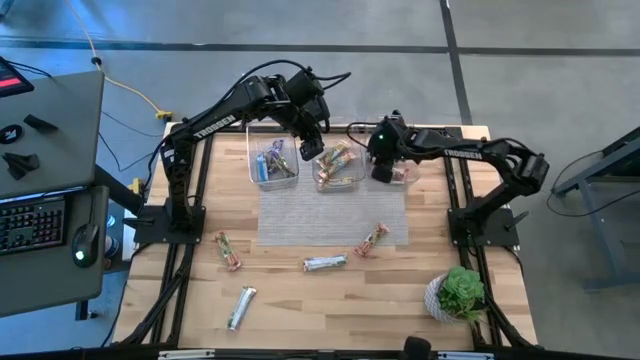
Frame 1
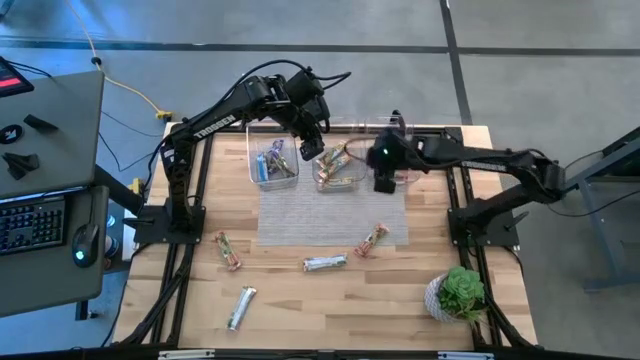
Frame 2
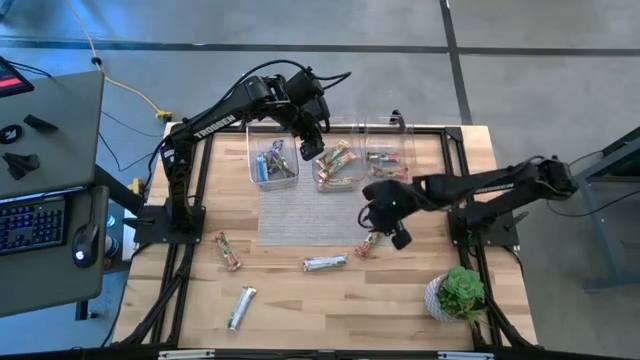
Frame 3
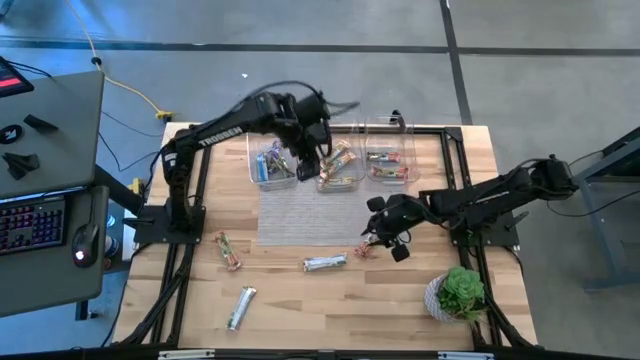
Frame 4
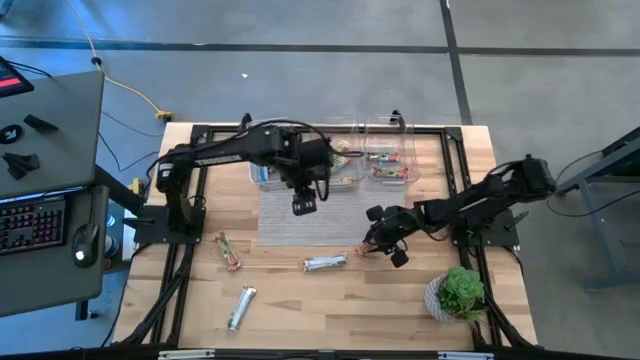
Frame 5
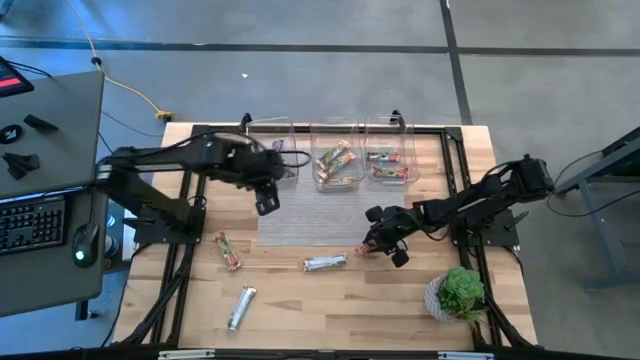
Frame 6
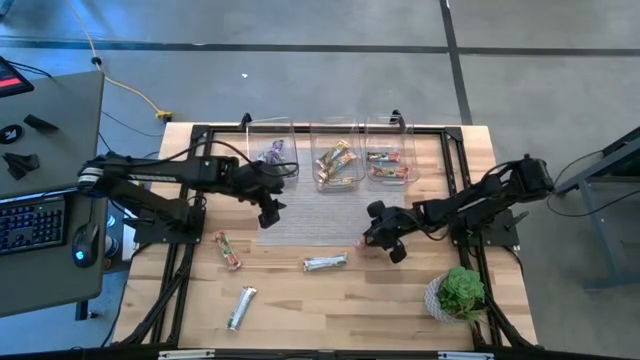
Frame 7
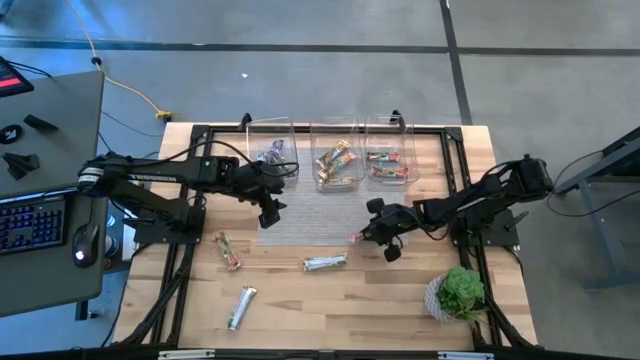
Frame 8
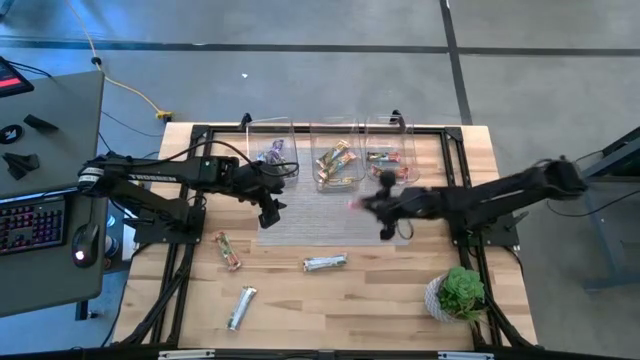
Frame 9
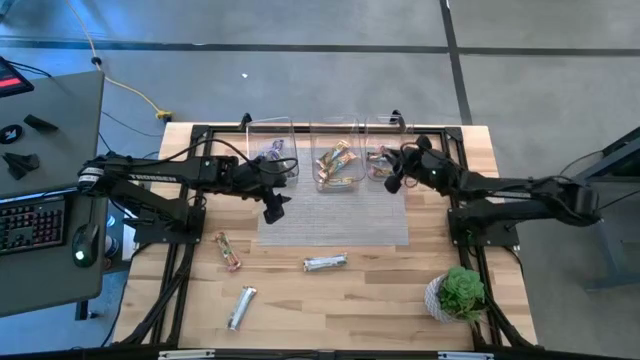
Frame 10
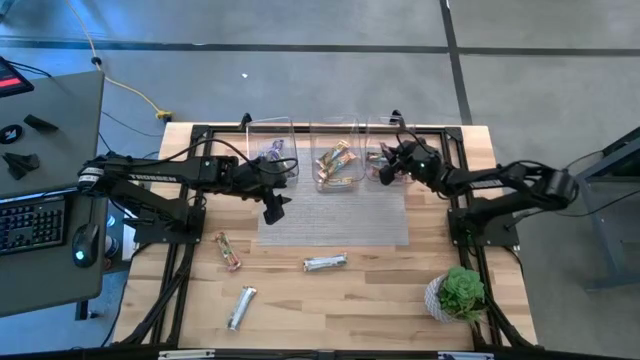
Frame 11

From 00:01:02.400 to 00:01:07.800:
Task: Pick and place Granola Bars by type
Put the red granola bar into the right transparent bin

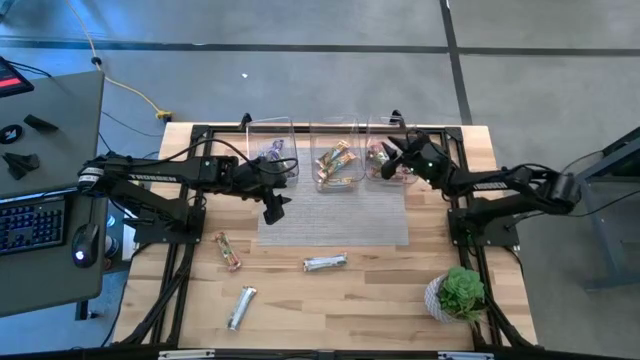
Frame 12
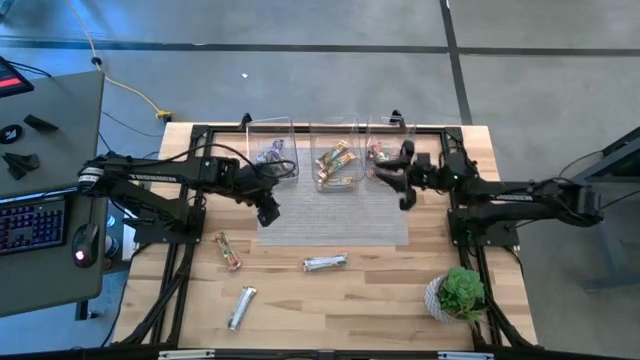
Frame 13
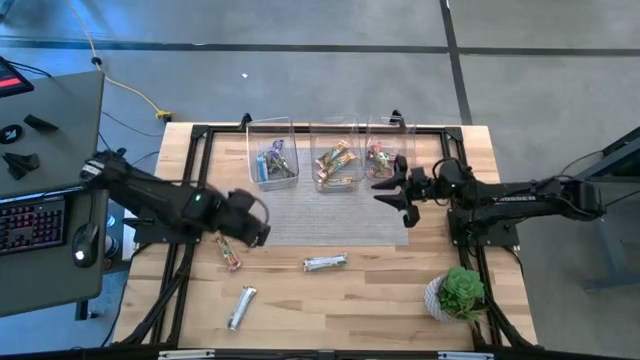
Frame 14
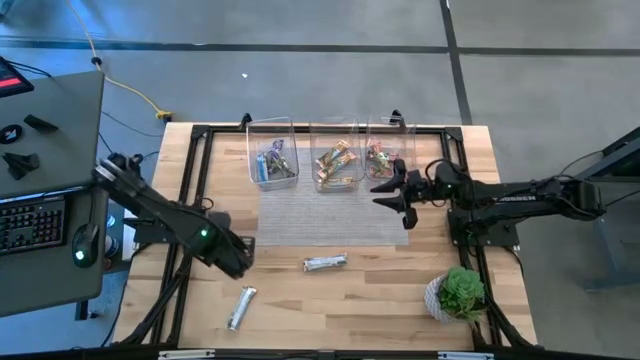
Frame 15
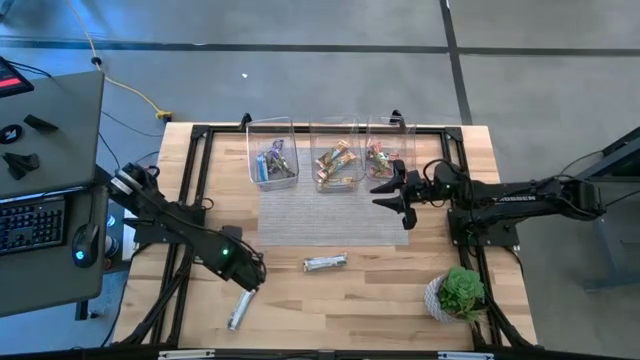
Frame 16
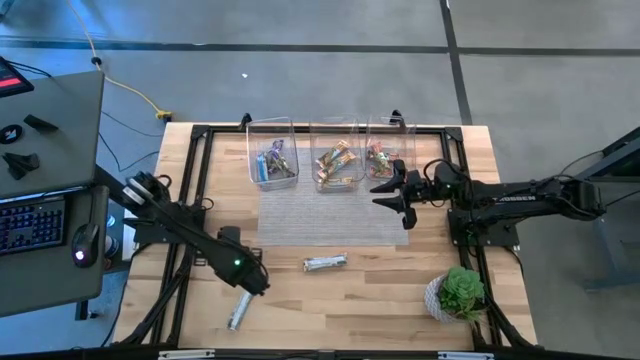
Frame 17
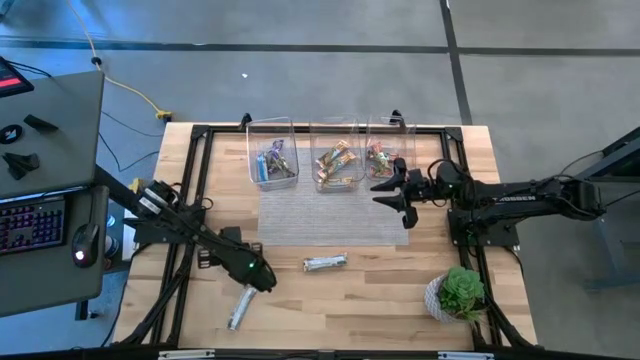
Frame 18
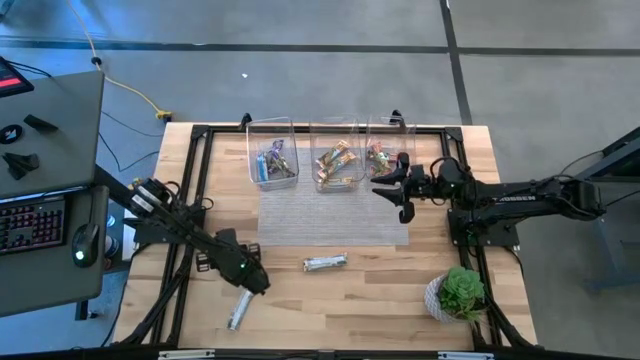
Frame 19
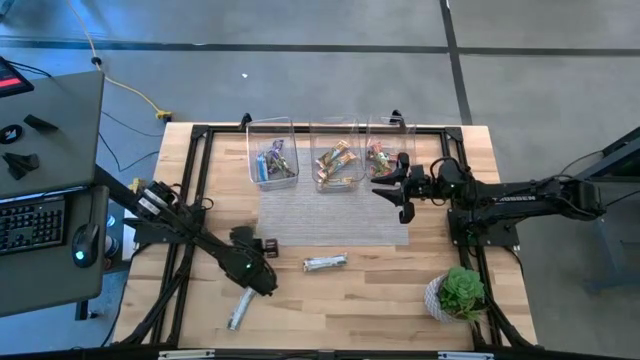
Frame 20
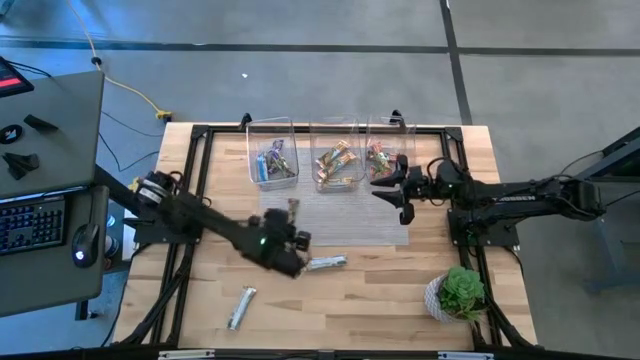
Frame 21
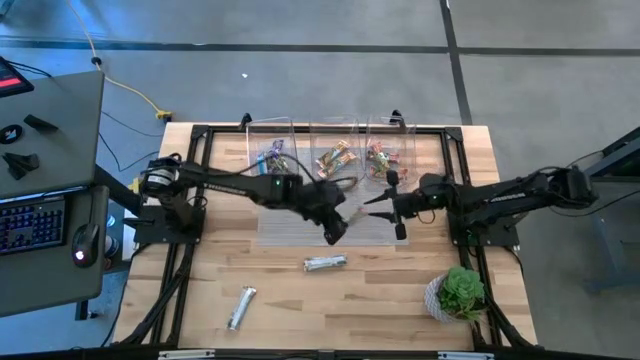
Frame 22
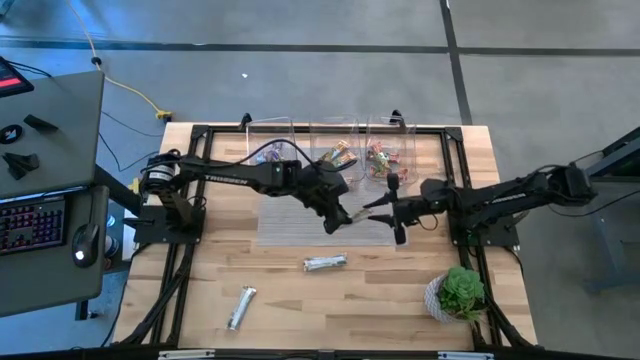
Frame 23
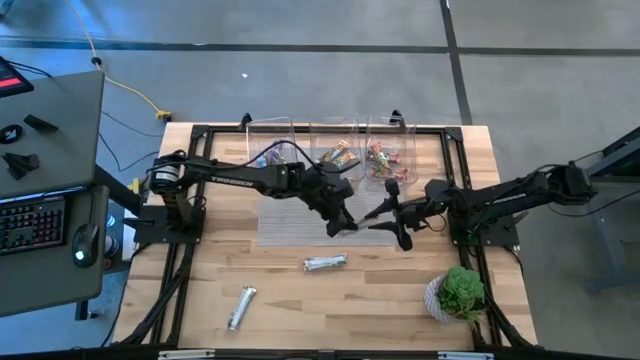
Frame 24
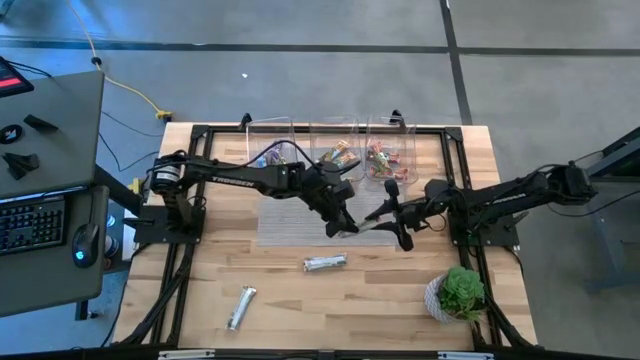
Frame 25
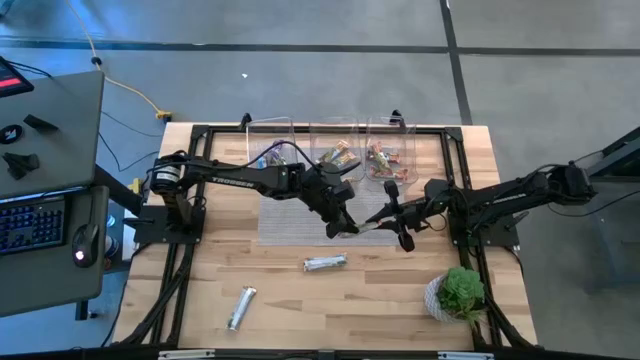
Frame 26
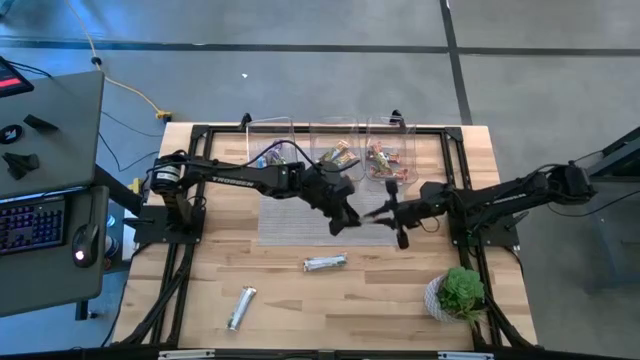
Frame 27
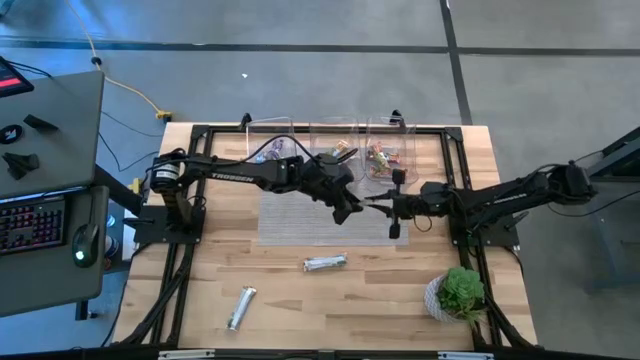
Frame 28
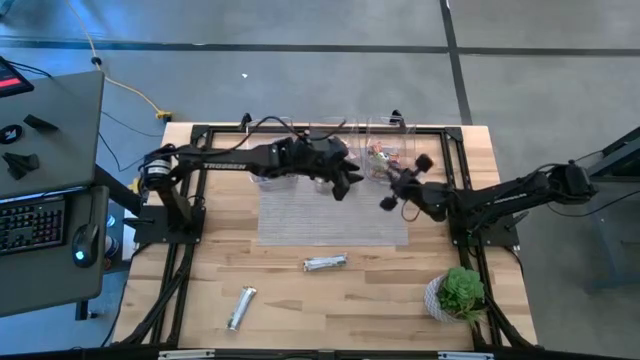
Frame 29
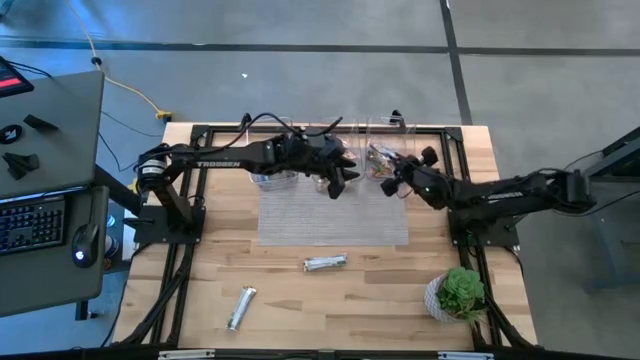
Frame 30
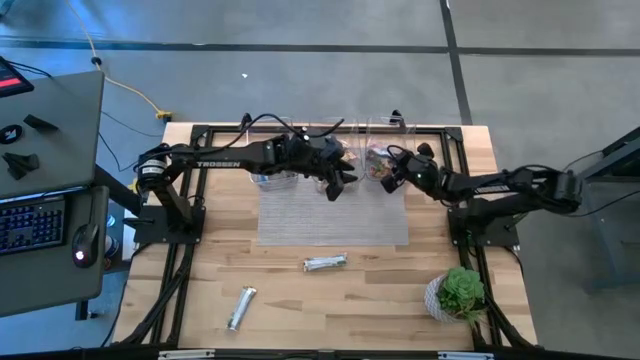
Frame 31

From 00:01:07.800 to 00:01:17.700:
Put the red granola bar into the right transparent bin

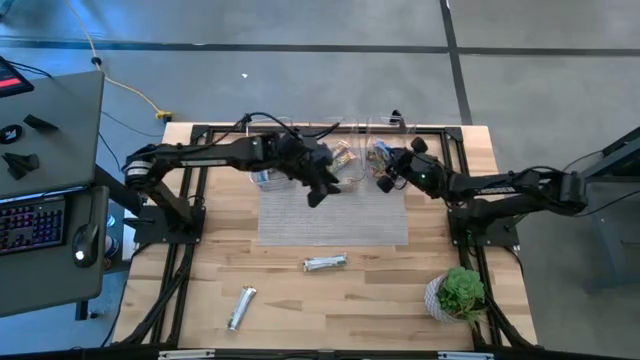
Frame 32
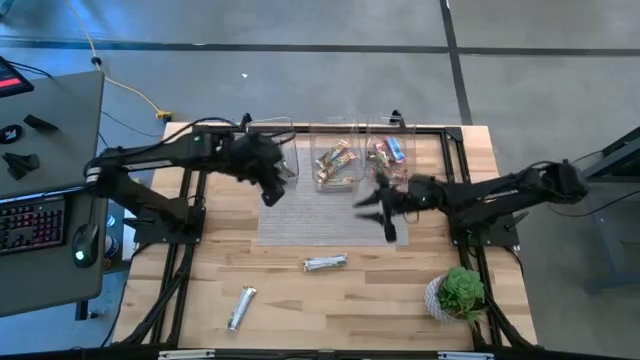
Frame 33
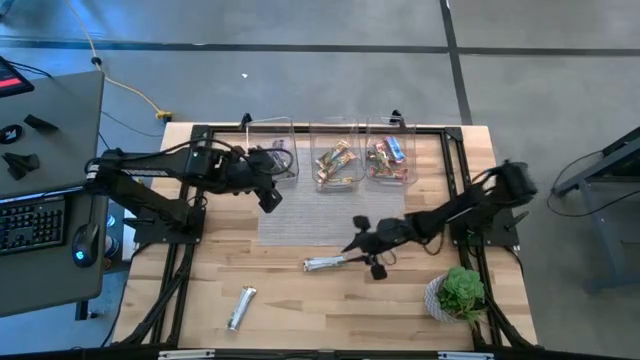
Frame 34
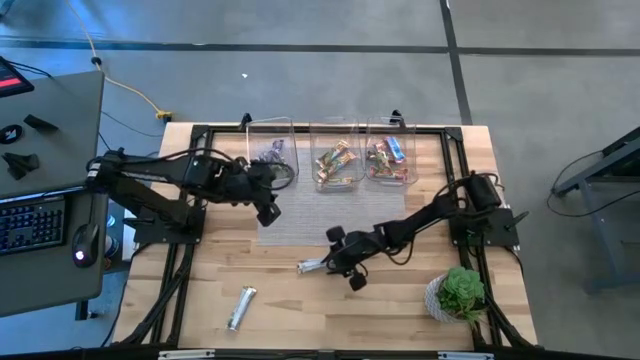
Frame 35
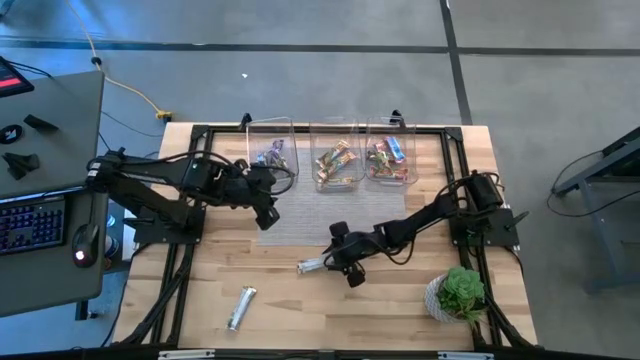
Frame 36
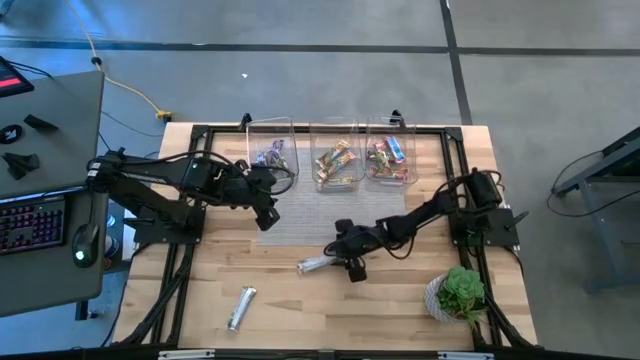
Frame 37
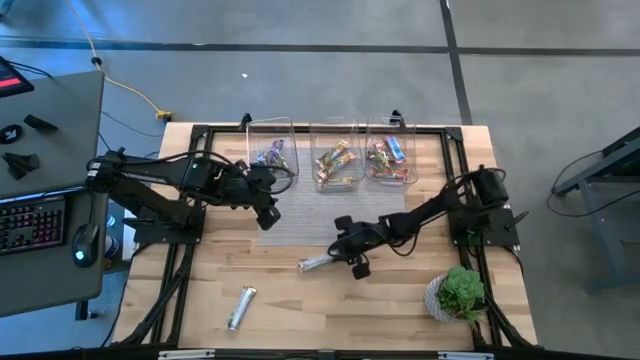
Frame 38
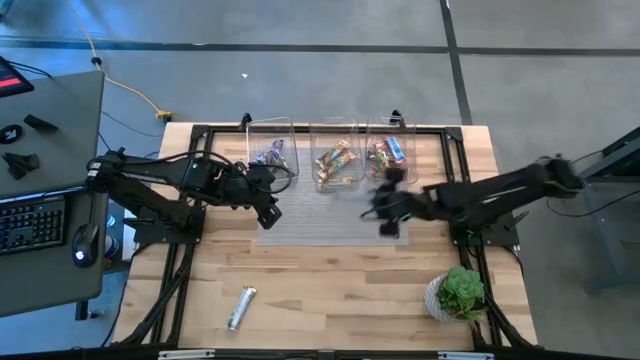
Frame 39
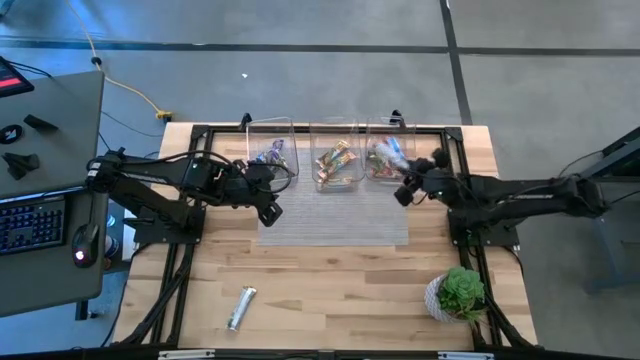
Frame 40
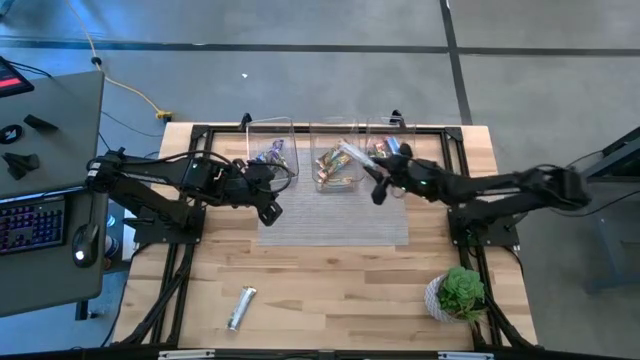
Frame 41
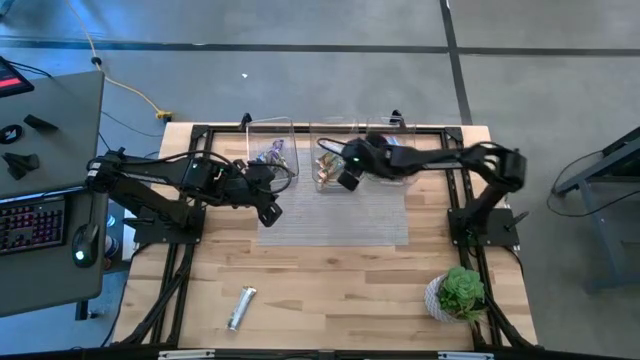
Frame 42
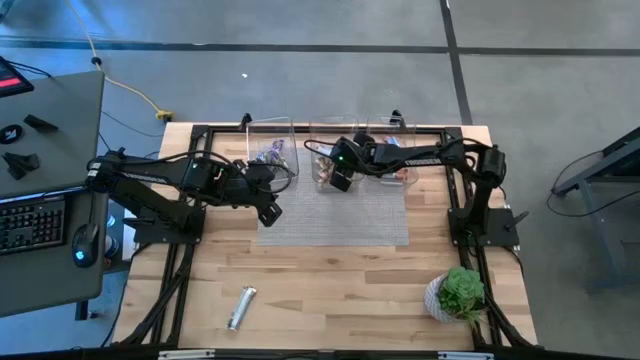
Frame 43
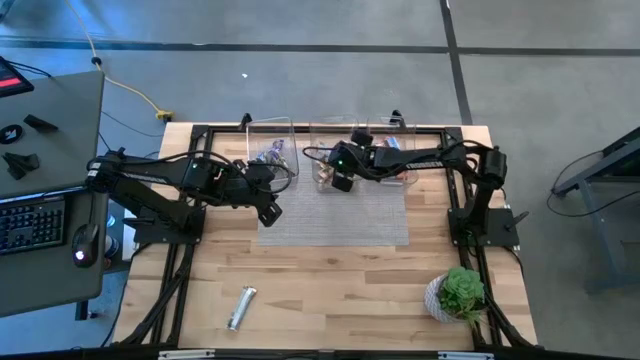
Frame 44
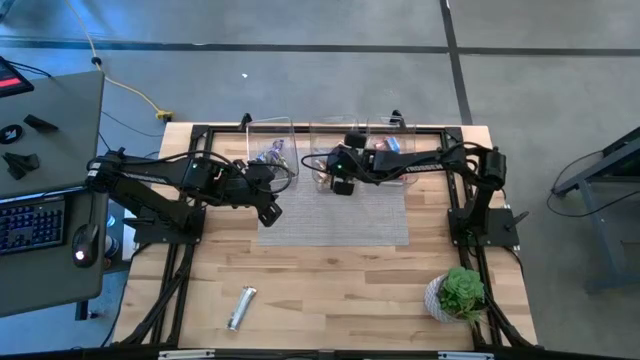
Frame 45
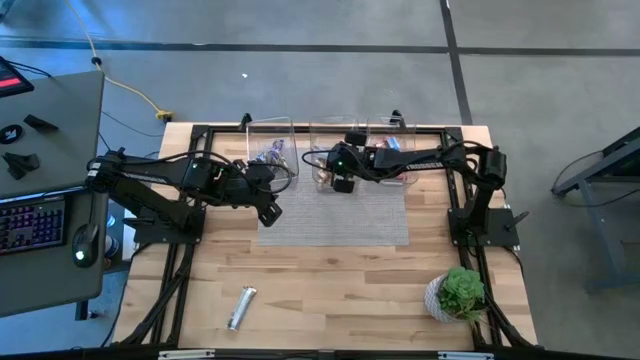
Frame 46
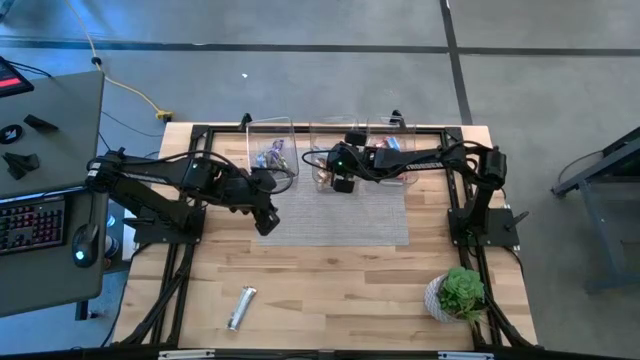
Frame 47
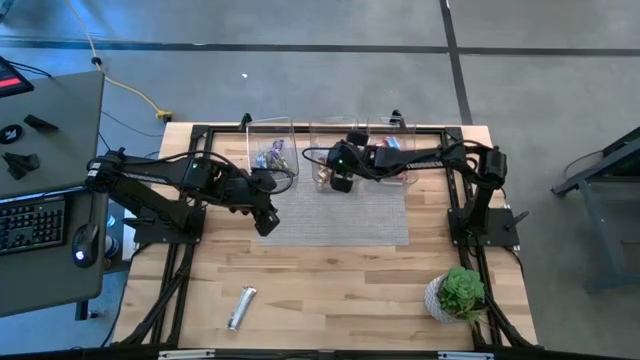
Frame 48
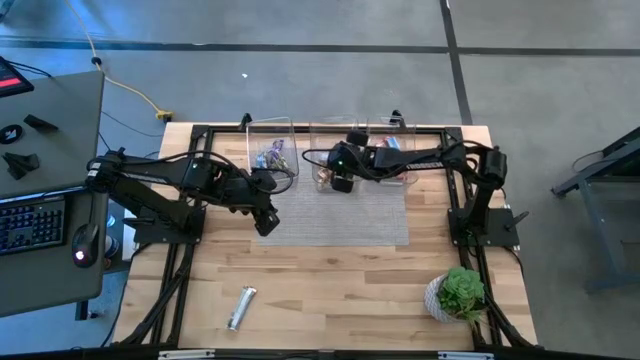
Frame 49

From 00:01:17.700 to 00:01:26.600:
Put the yellow granola bar into the middle transparent bin
